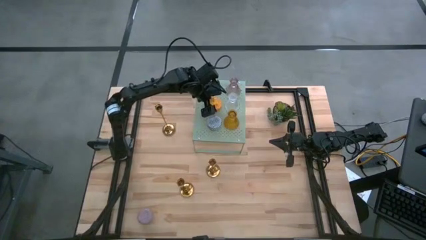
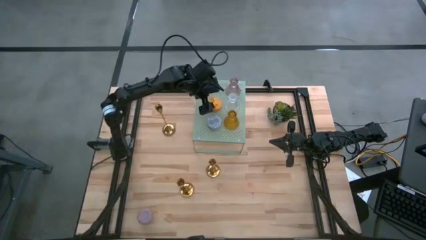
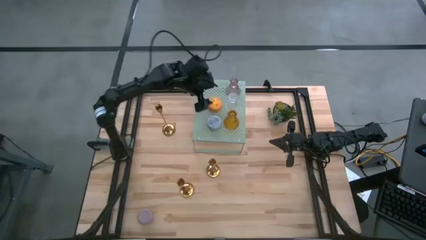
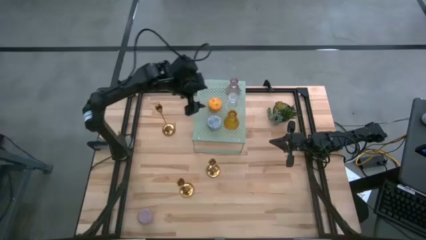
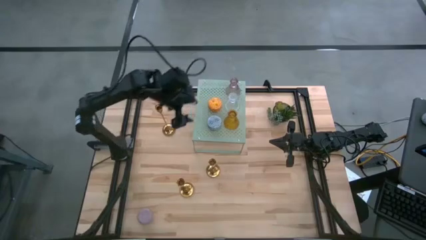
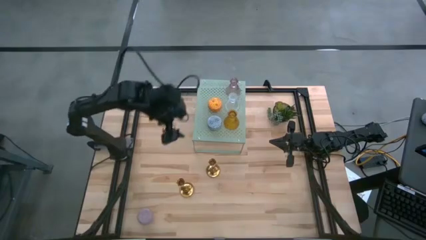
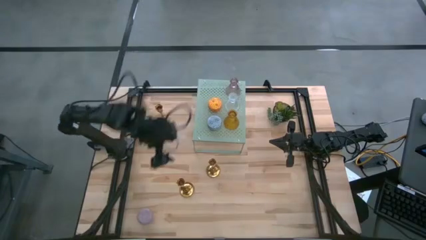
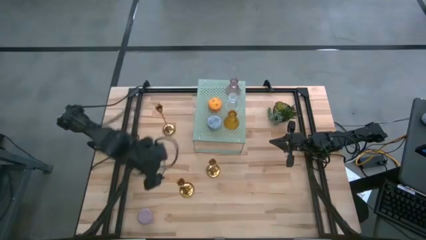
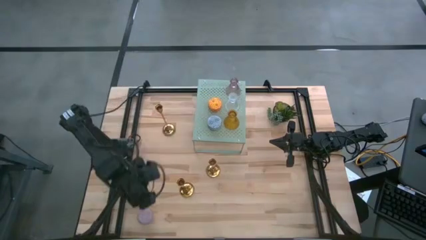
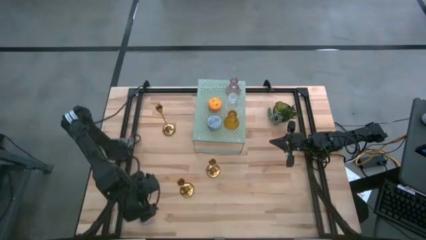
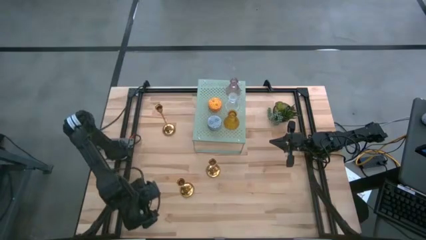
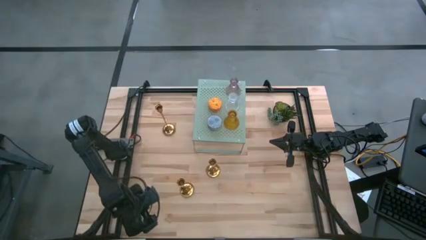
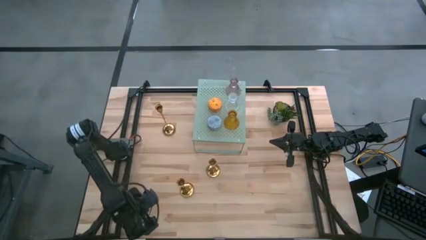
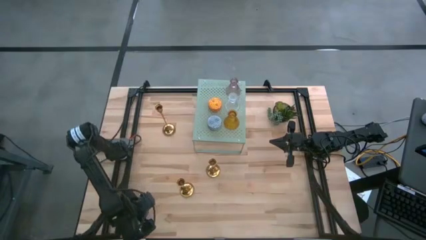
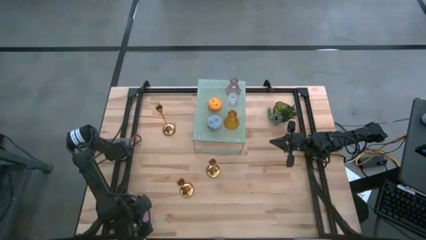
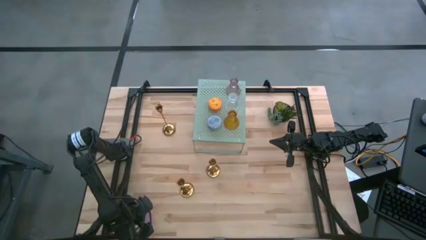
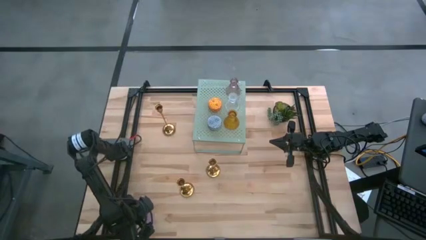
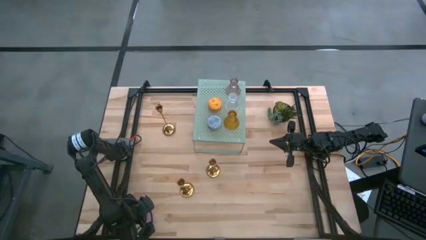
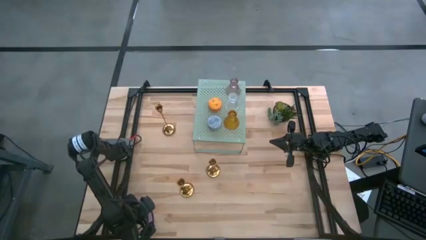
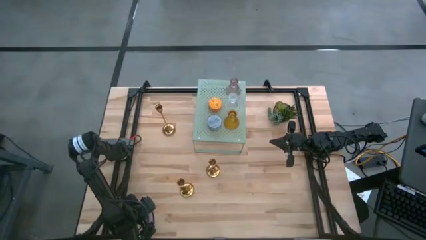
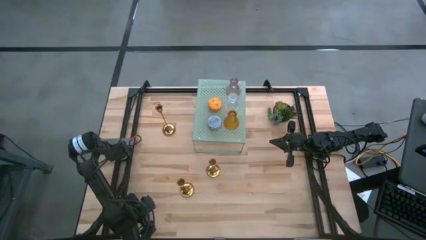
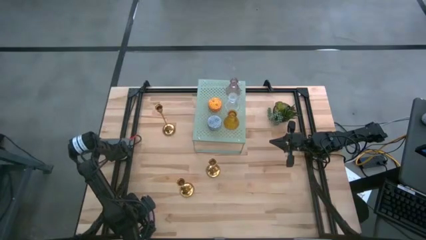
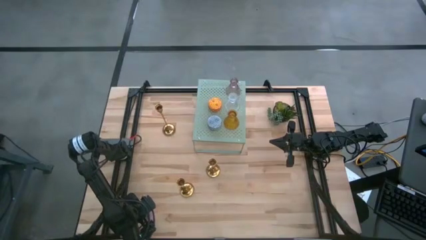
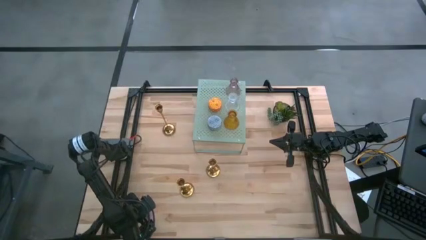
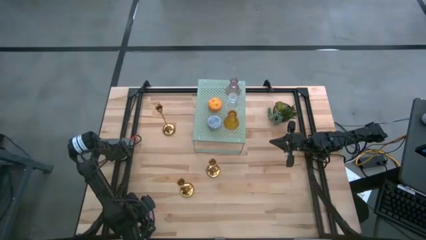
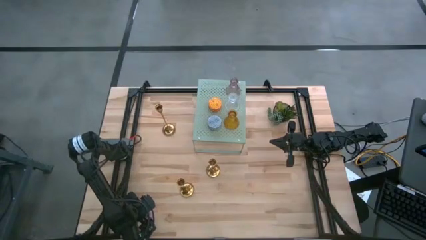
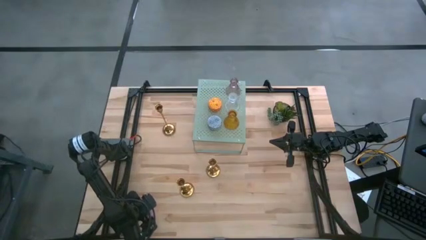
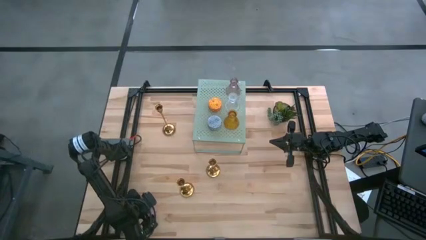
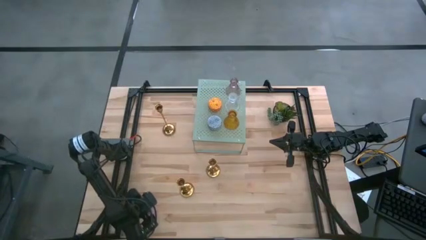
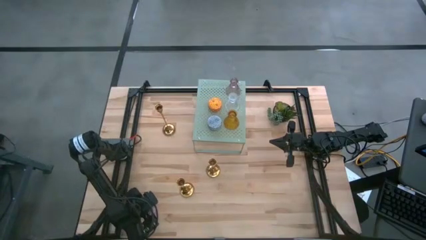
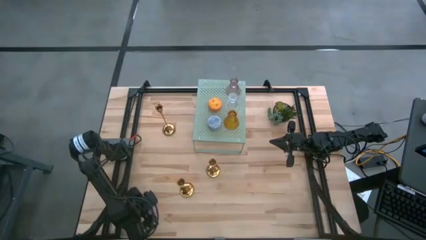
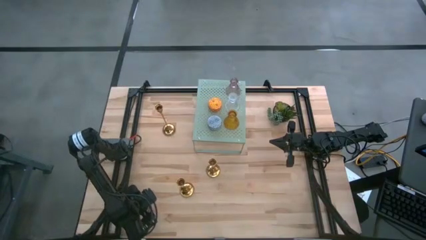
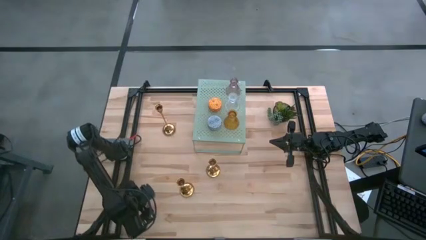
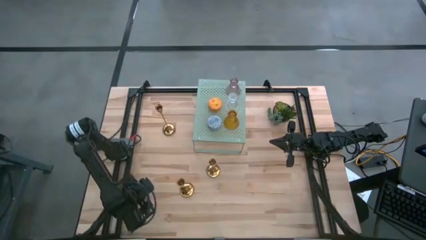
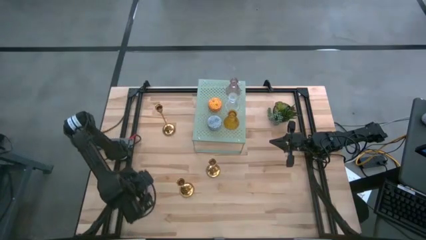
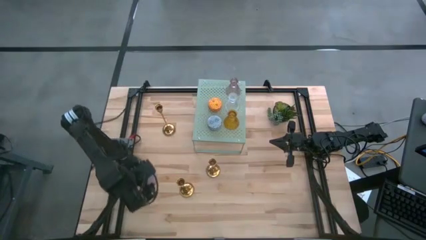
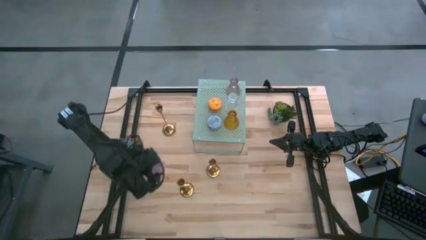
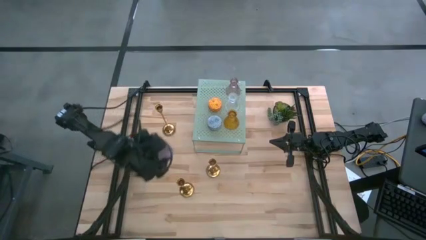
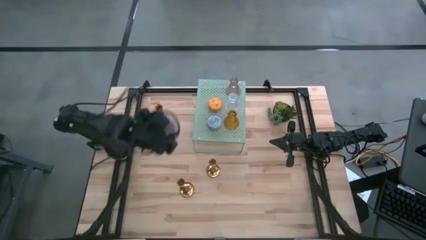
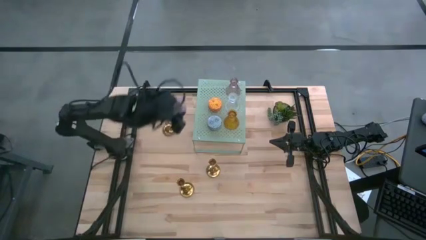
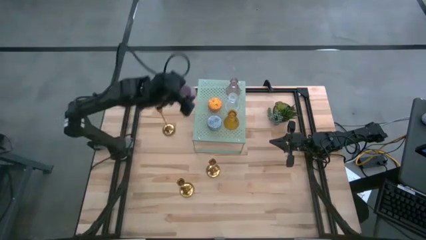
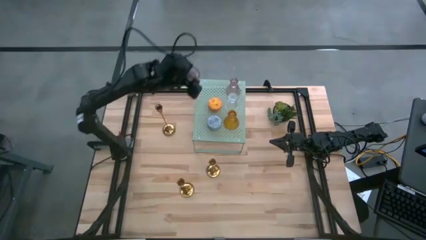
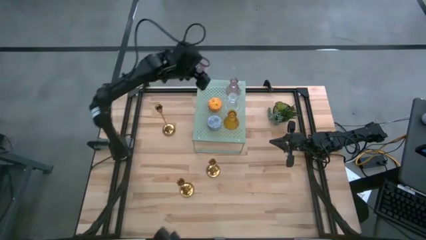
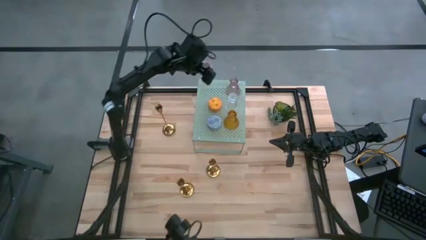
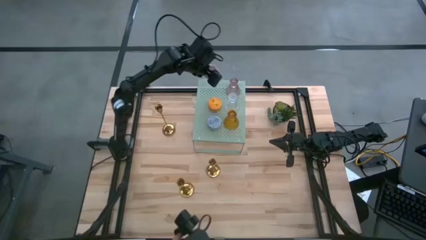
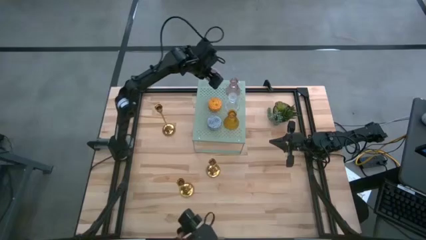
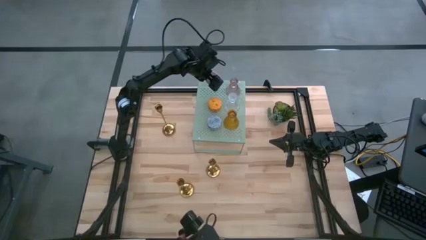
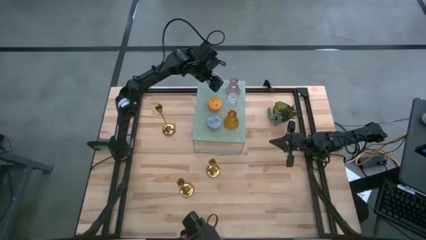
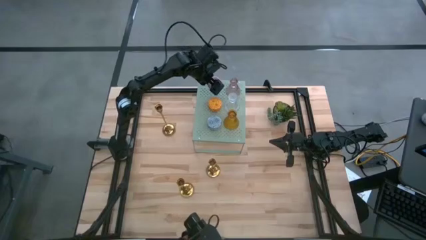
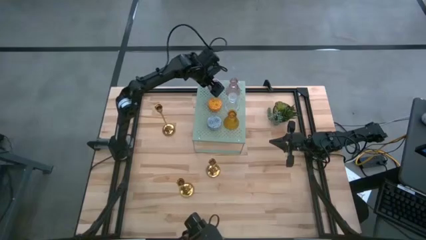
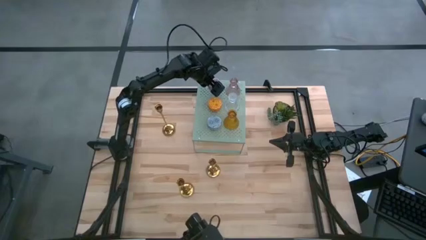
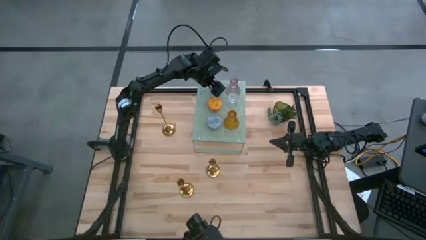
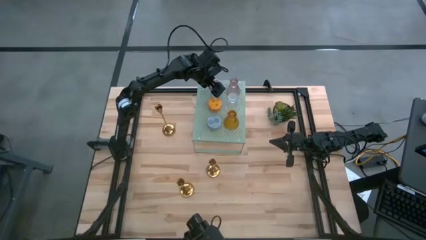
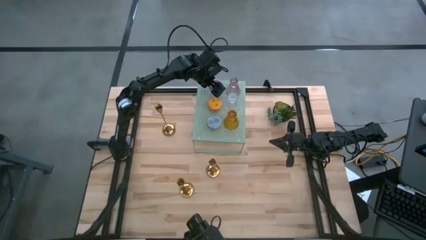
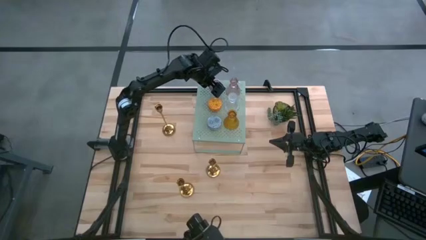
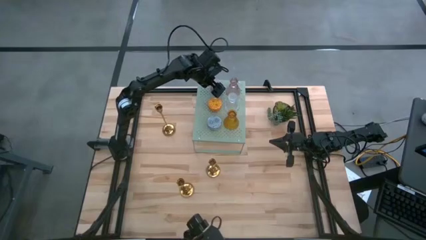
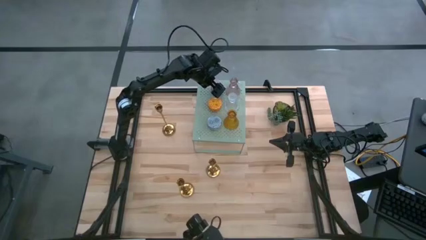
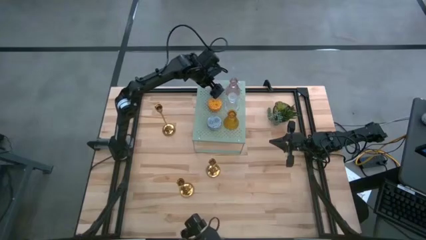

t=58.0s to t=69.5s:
Task: Stock candles on shelf
Put the pink scented candle and aligned it with the other yellow scented candle on the shelf
